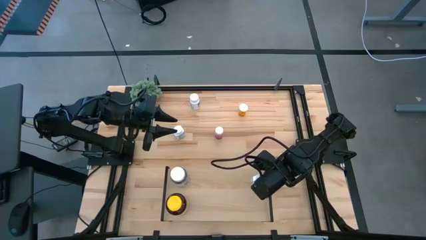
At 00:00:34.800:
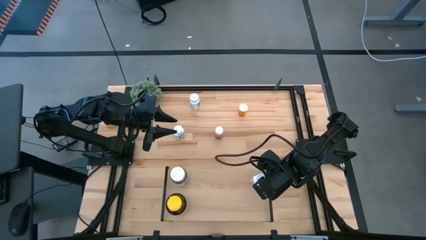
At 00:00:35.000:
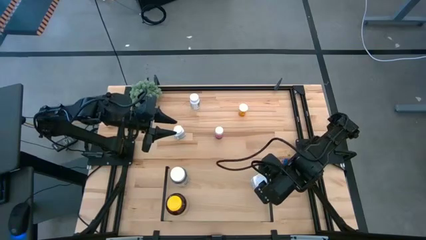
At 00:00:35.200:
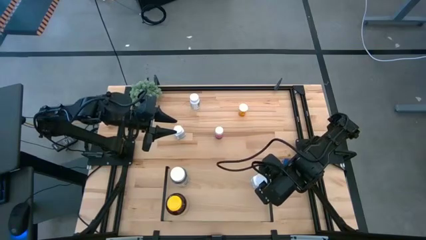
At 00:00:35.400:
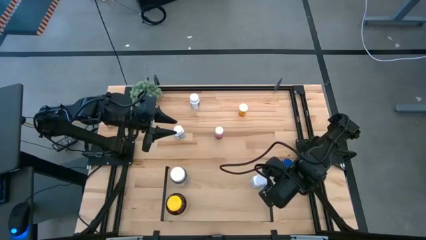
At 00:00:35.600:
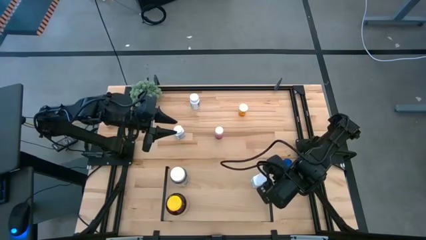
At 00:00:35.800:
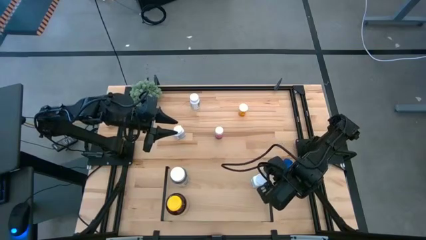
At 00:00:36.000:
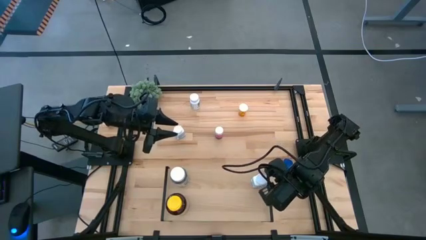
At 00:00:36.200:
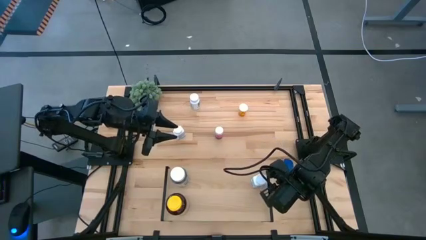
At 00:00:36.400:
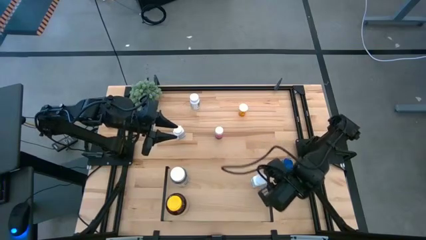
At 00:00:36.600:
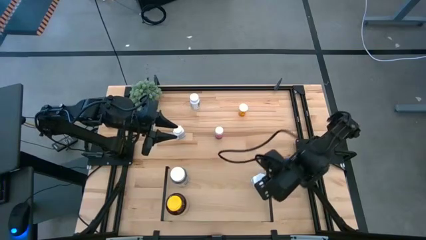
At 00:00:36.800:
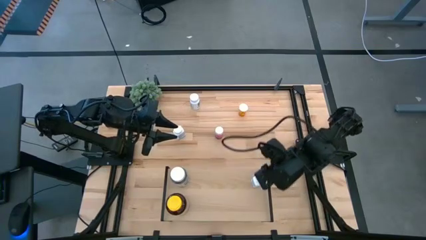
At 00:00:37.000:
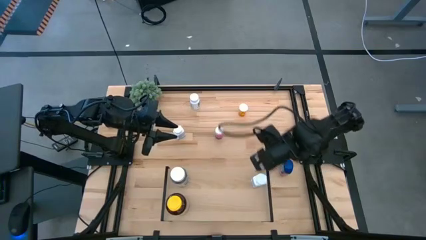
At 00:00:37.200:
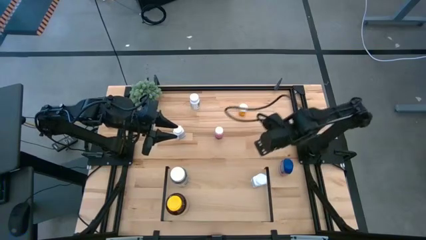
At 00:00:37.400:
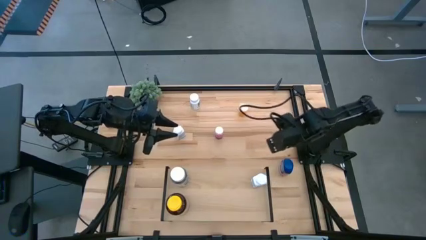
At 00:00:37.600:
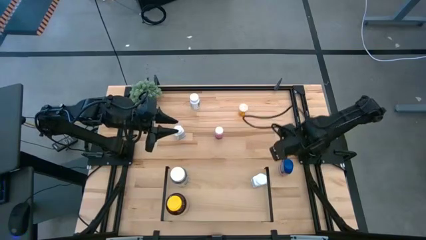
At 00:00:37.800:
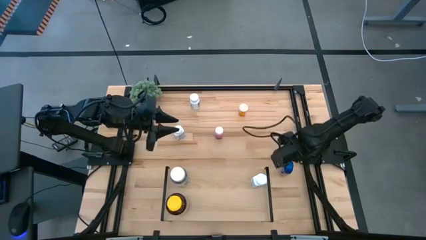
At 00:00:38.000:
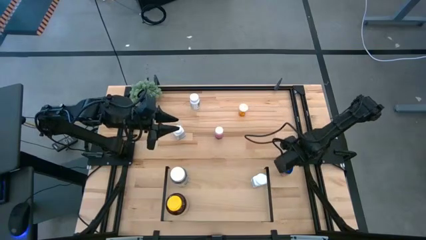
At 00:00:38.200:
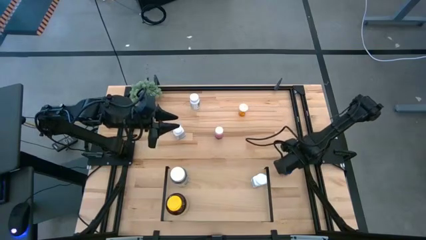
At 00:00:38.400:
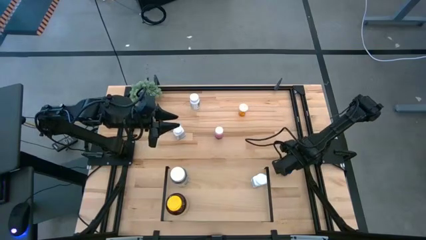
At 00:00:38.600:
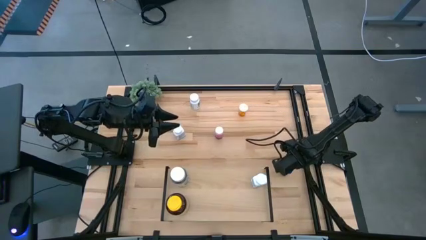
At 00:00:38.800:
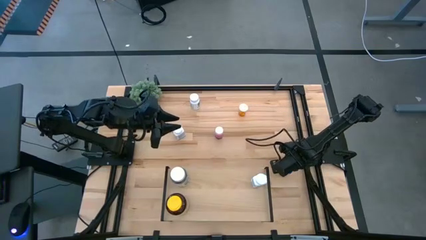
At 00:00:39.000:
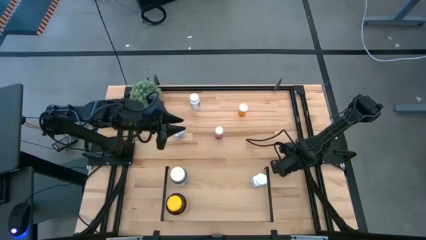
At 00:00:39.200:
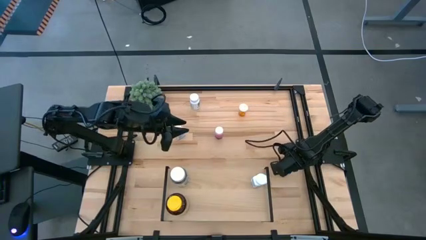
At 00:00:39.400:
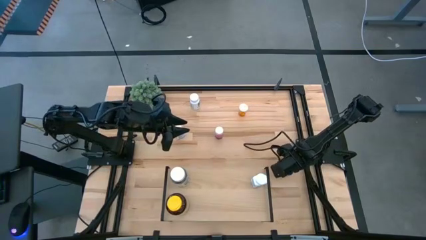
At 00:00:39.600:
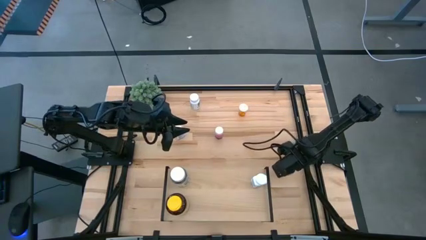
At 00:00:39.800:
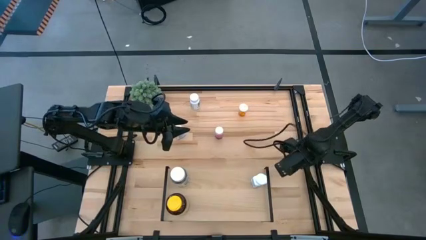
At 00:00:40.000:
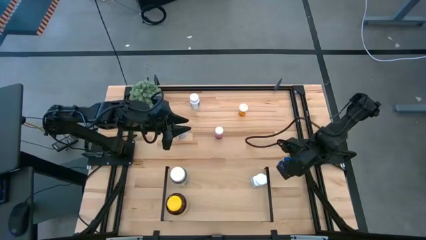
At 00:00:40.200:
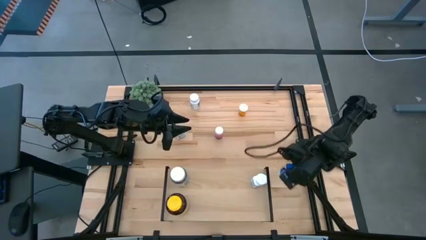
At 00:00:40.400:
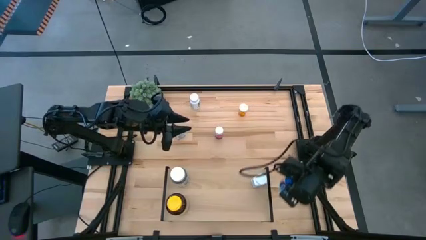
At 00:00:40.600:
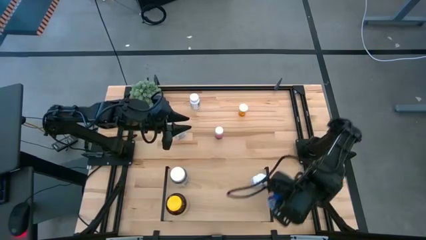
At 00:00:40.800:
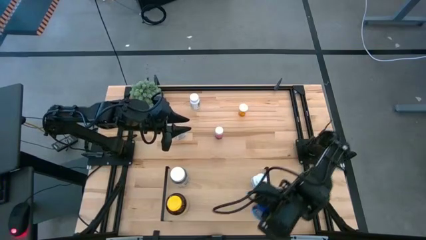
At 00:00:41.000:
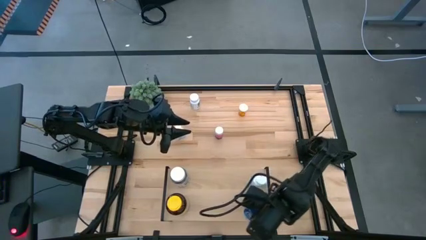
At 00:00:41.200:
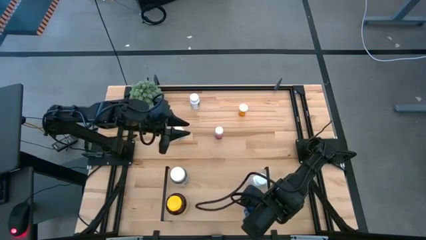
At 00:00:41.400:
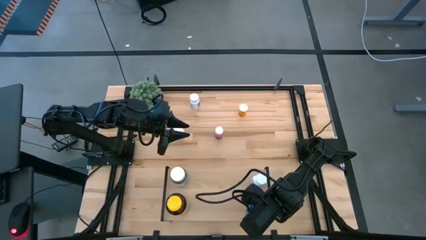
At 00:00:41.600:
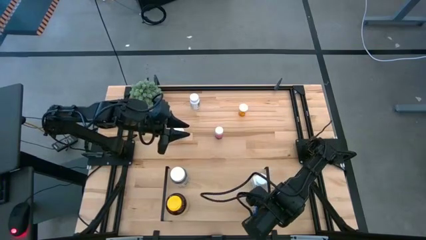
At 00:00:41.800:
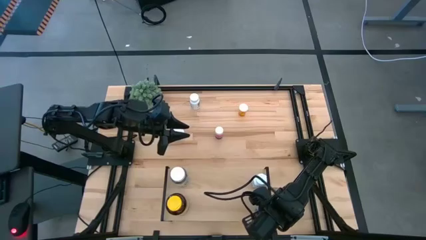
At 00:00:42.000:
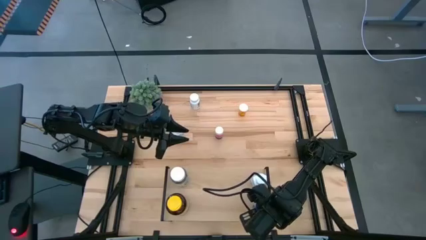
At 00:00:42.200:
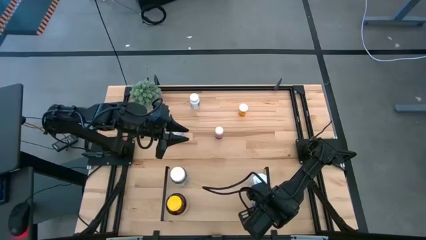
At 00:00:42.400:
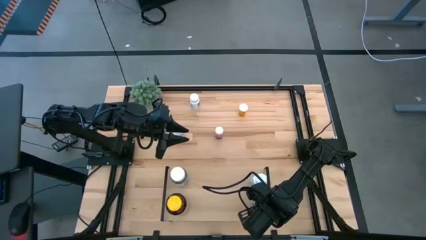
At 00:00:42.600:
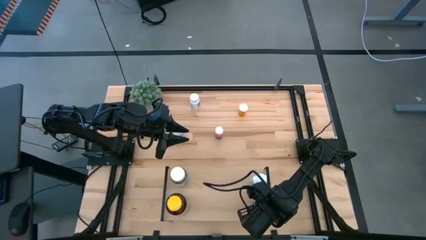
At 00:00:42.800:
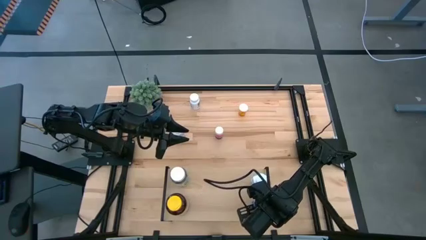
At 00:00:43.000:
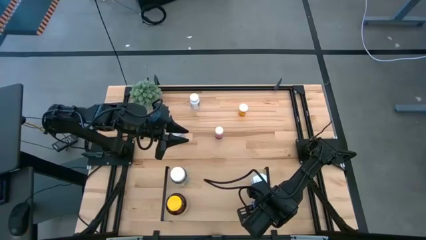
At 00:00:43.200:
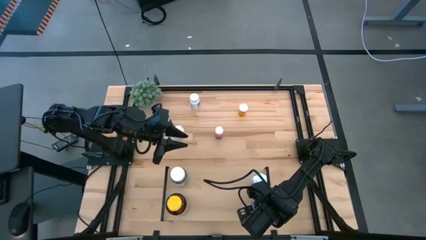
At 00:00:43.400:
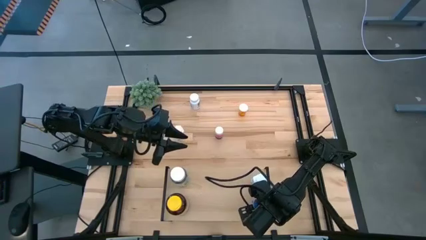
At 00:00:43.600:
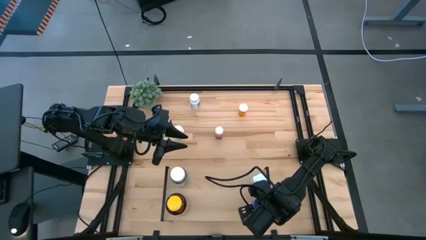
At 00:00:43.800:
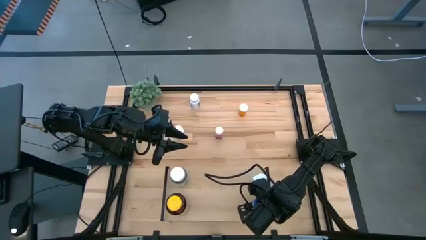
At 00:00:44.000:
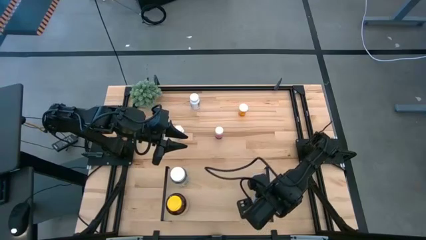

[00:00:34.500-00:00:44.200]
Task: Pick and place medicine bottles onto shelf by color
Put the blue pill bottle on the shelf

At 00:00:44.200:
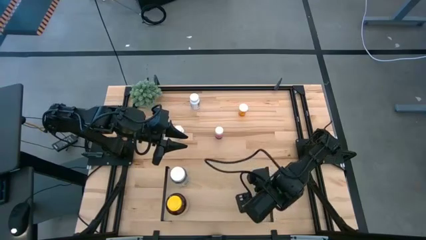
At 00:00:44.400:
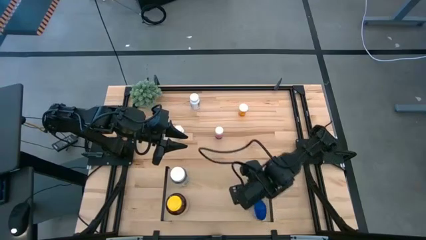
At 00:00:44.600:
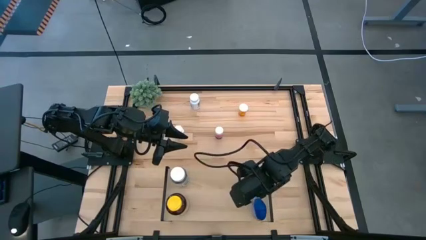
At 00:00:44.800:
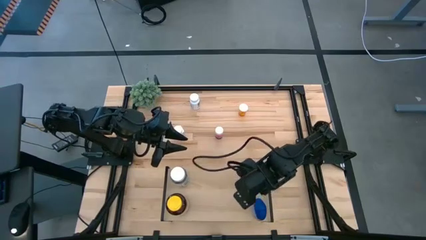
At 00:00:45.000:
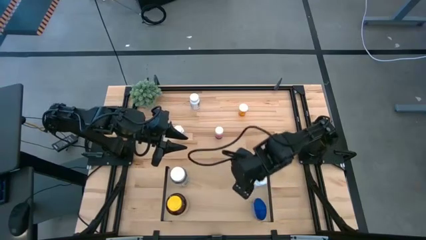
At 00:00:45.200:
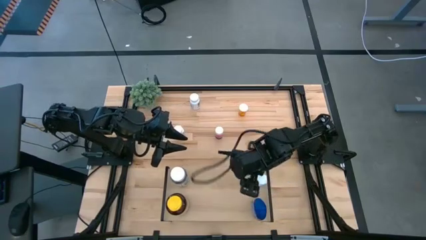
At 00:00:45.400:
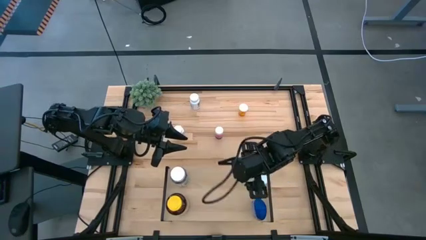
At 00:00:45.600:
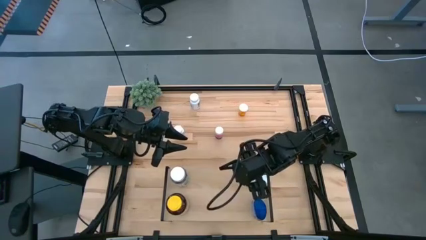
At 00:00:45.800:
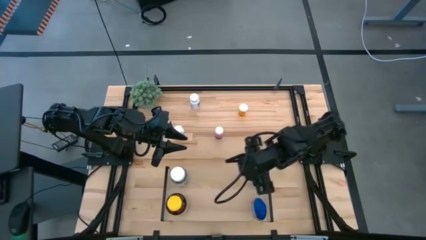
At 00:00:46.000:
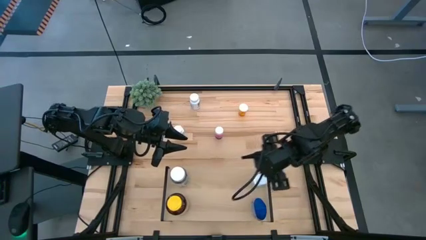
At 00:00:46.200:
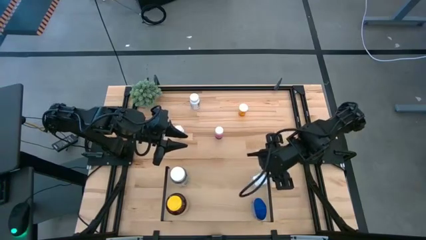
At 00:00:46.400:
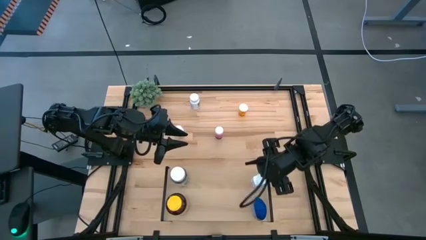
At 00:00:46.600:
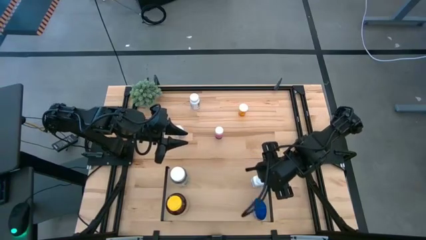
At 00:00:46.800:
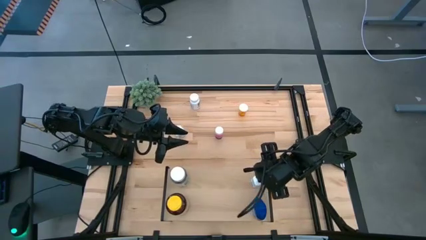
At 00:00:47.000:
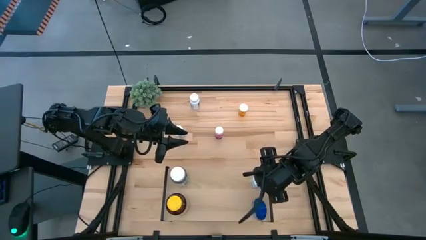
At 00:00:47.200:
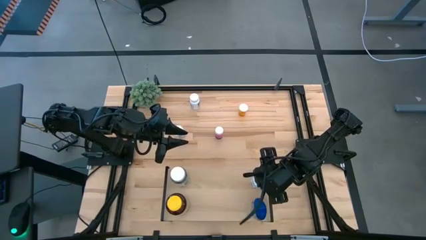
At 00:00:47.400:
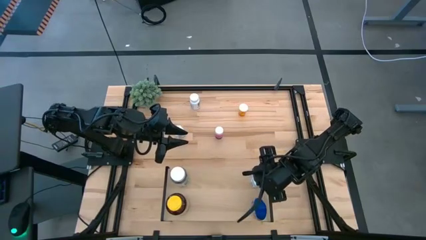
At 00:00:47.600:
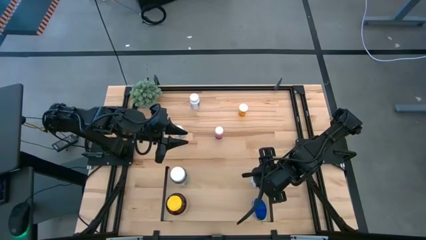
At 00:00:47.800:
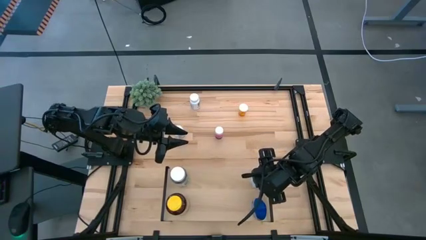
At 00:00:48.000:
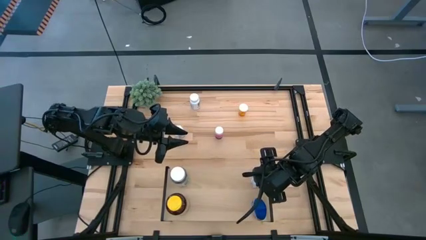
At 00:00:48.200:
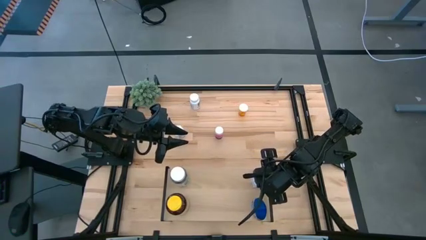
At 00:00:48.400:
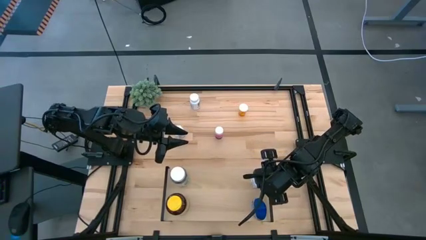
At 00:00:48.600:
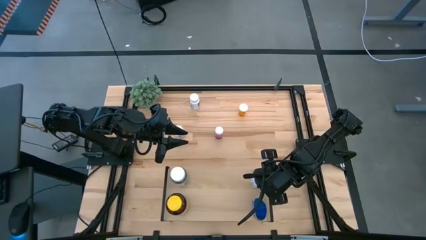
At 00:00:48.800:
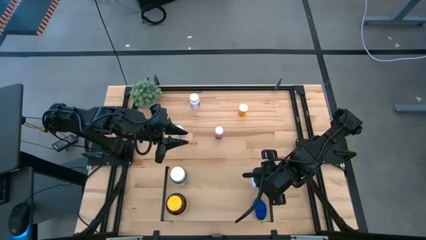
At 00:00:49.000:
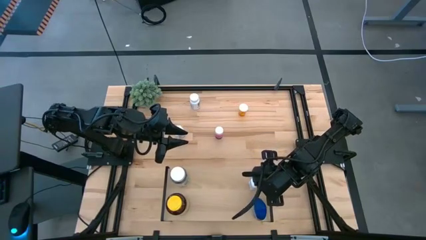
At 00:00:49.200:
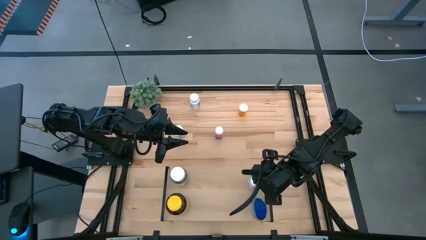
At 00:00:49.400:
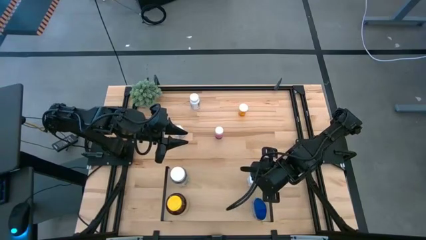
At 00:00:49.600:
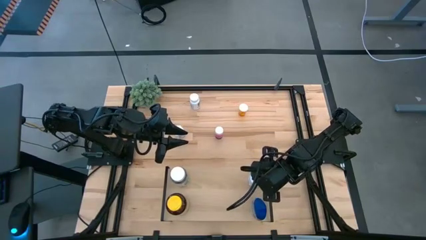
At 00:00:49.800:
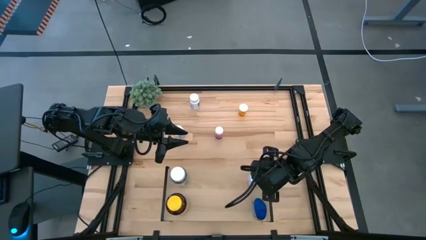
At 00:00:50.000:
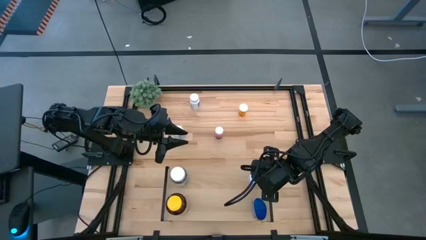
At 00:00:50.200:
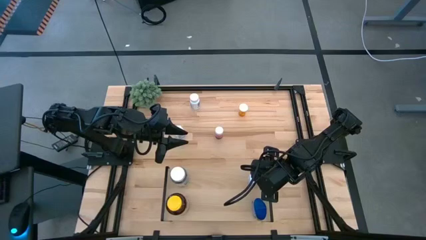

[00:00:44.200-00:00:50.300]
Adjust the white blue pill bottle on the shelf
